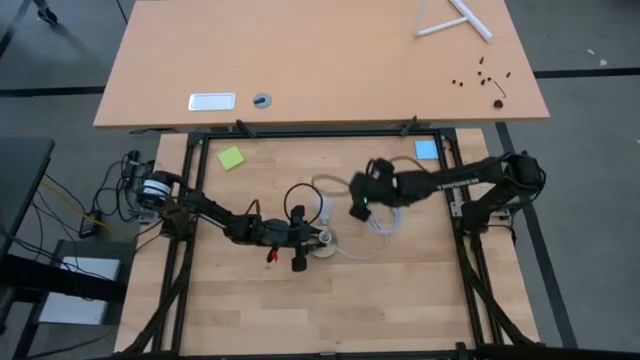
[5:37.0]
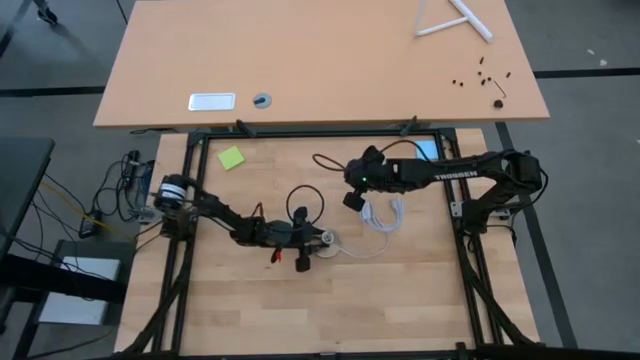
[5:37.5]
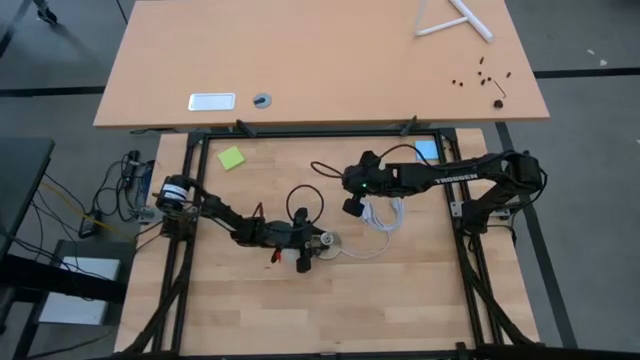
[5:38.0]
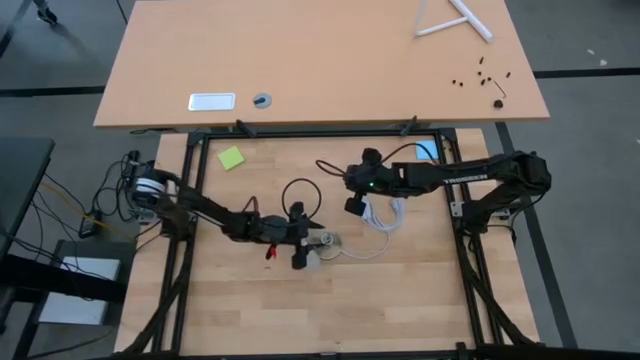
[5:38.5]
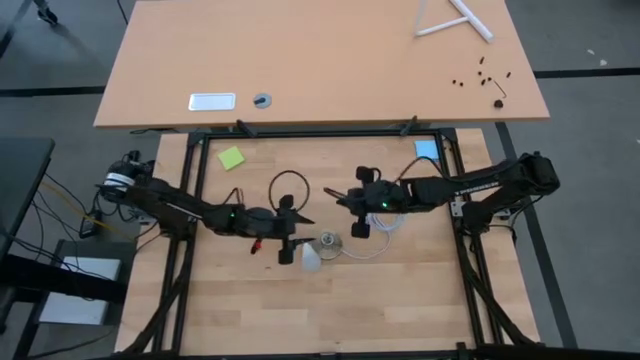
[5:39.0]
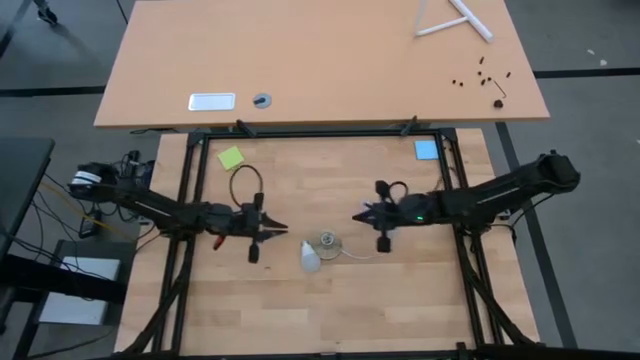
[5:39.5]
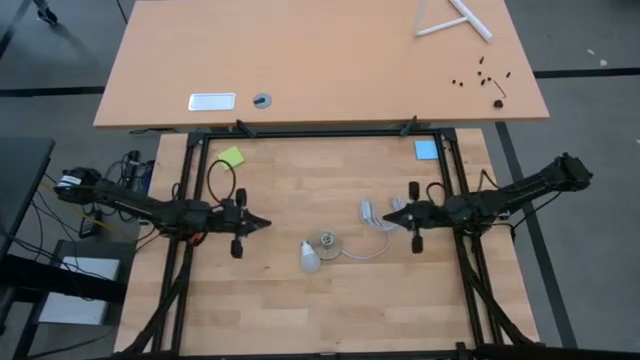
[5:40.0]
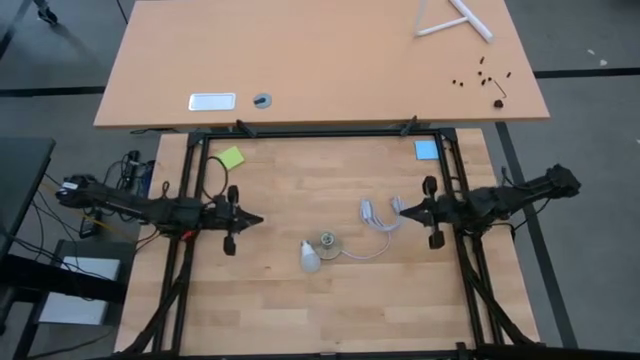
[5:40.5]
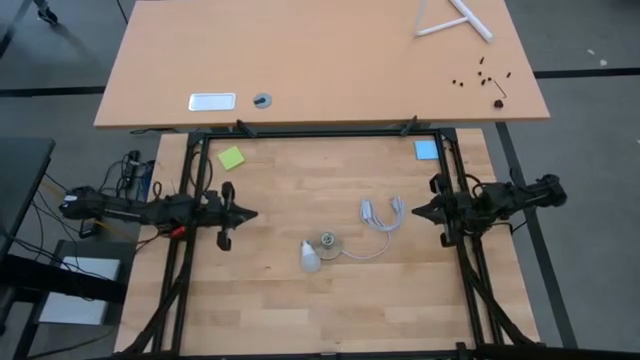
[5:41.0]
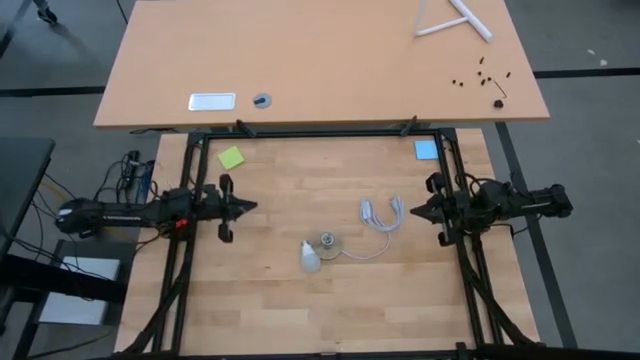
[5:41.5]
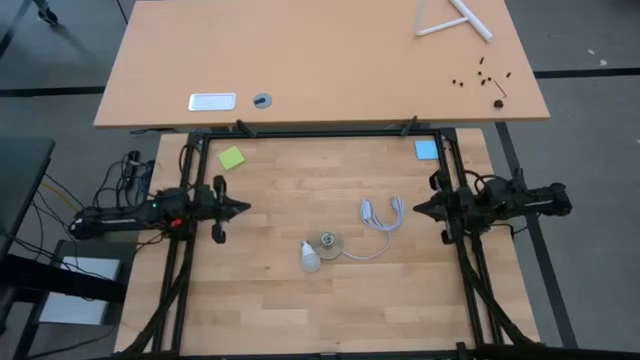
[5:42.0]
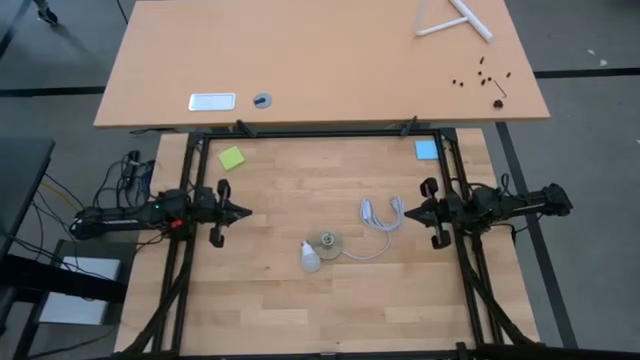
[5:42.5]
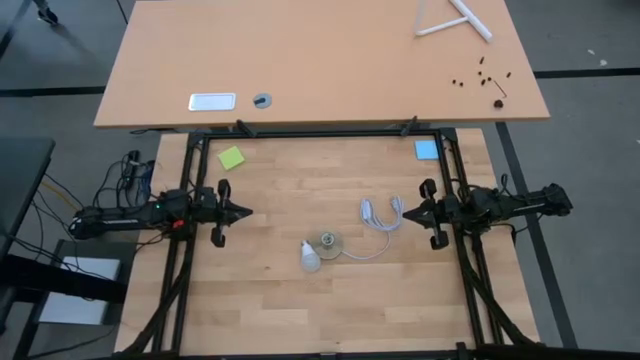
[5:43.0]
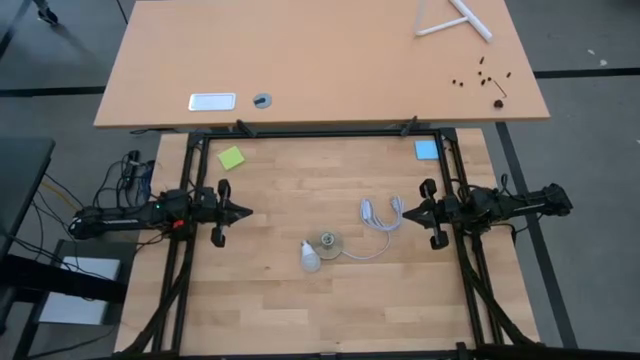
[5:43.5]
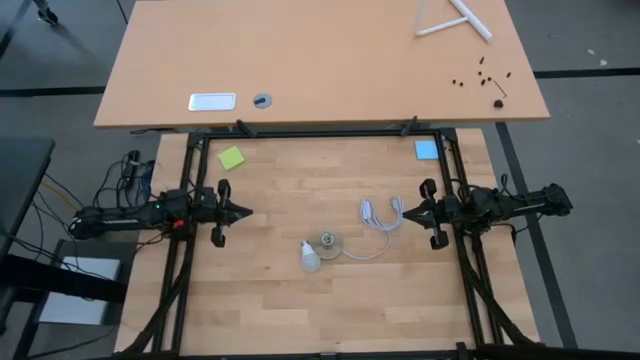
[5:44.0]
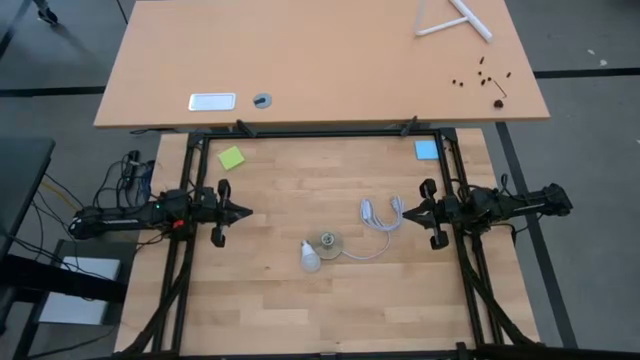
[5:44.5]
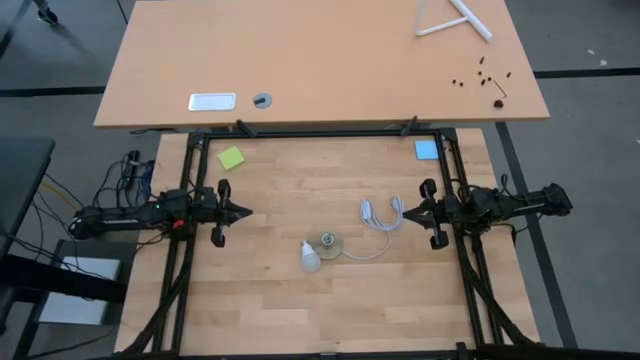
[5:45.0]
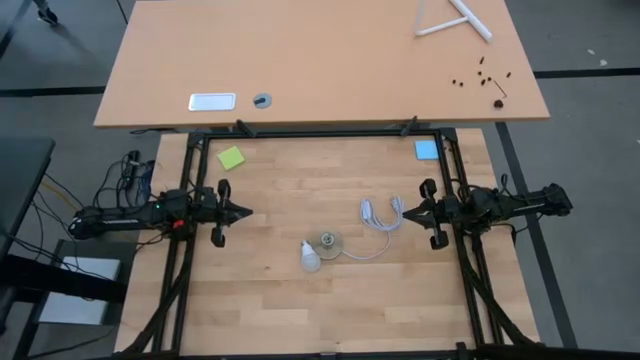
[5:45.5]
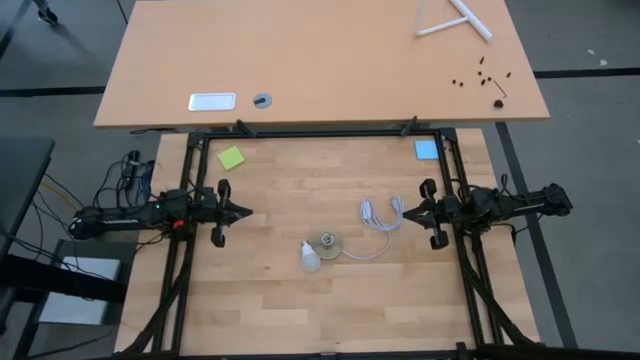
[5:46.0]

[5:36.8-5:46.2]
Task: Screw lightbulb
Return to Home Position

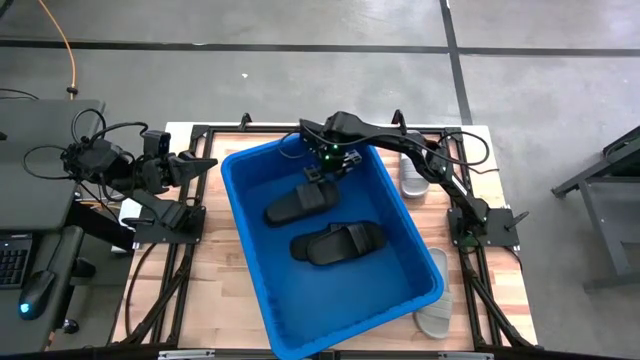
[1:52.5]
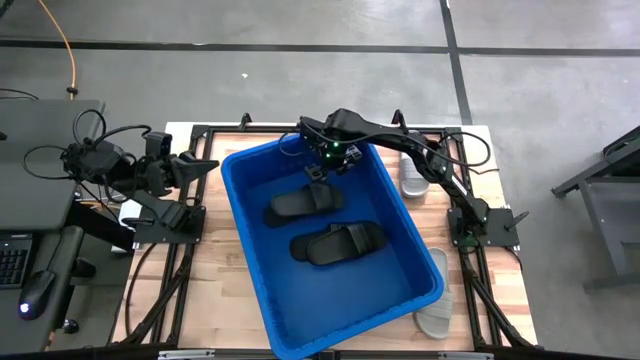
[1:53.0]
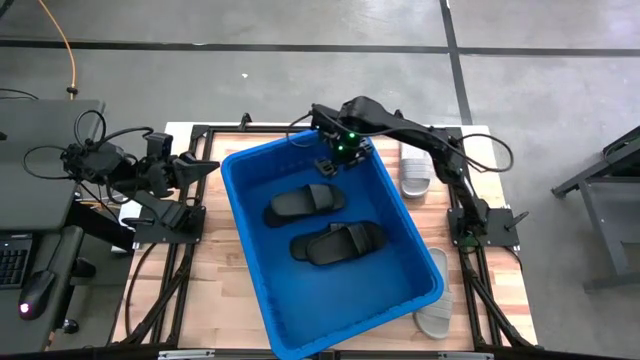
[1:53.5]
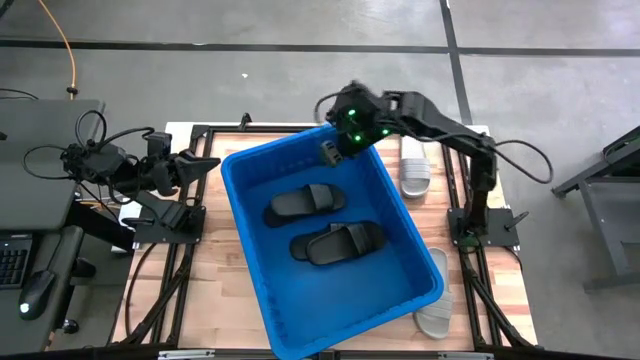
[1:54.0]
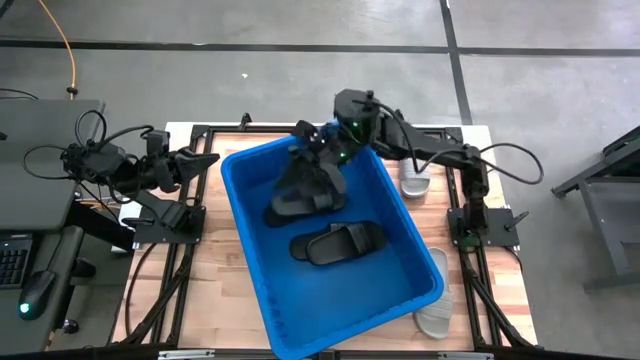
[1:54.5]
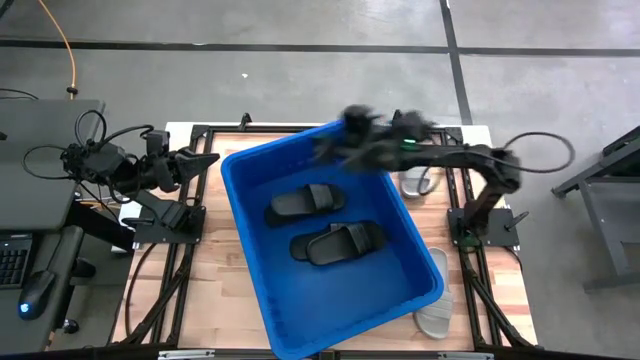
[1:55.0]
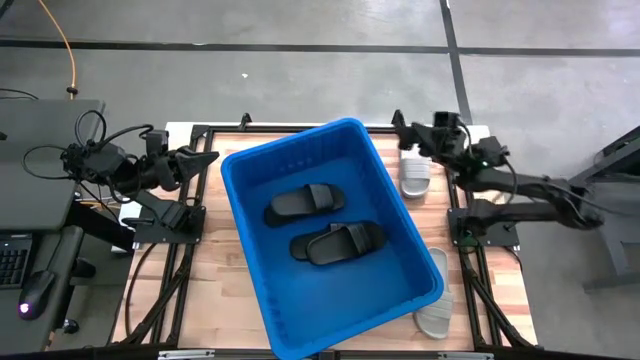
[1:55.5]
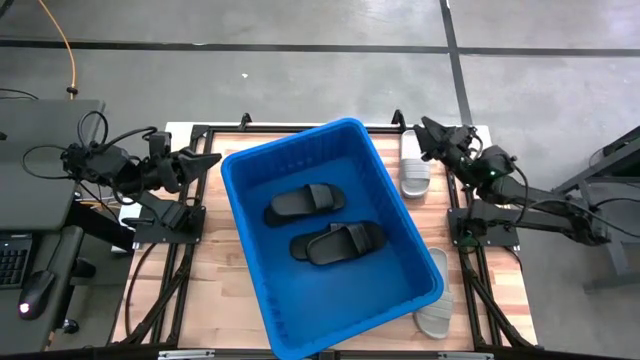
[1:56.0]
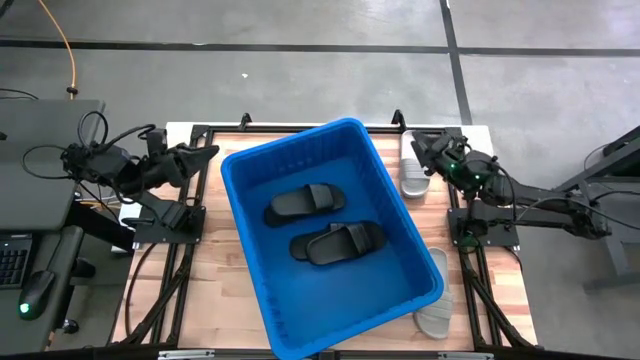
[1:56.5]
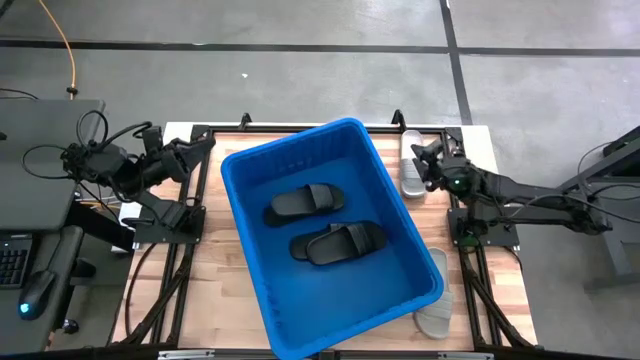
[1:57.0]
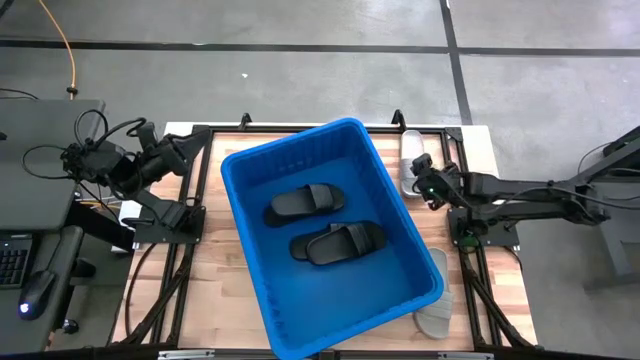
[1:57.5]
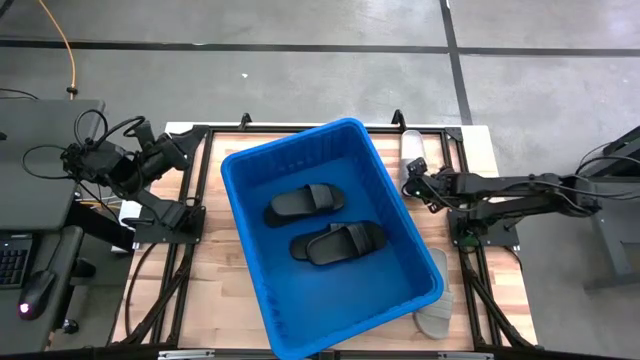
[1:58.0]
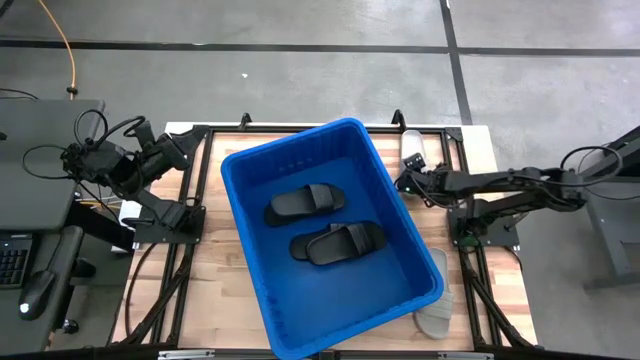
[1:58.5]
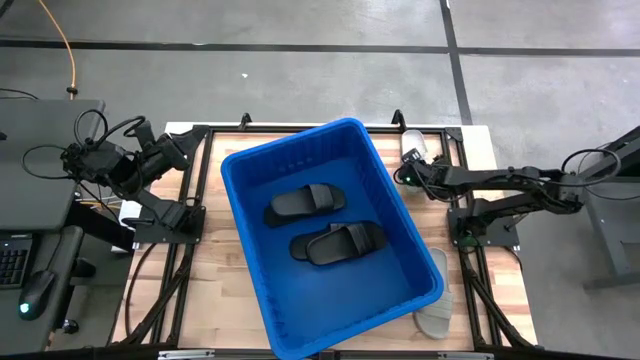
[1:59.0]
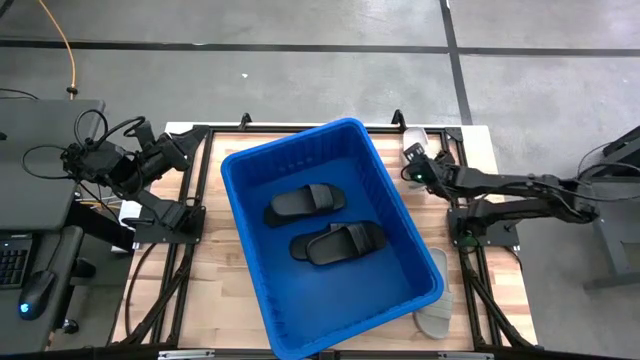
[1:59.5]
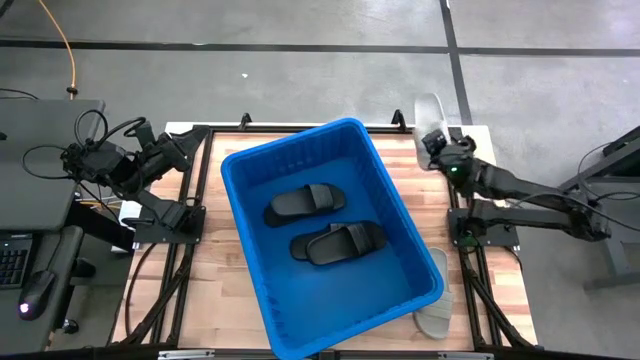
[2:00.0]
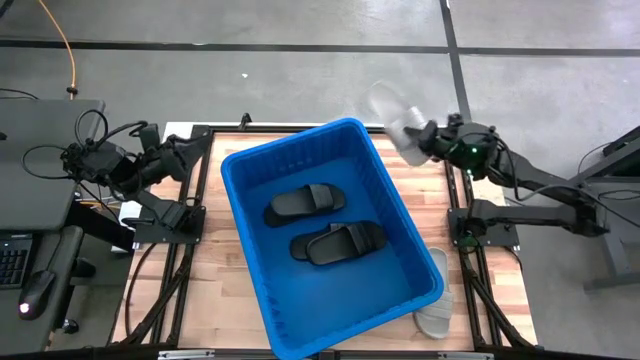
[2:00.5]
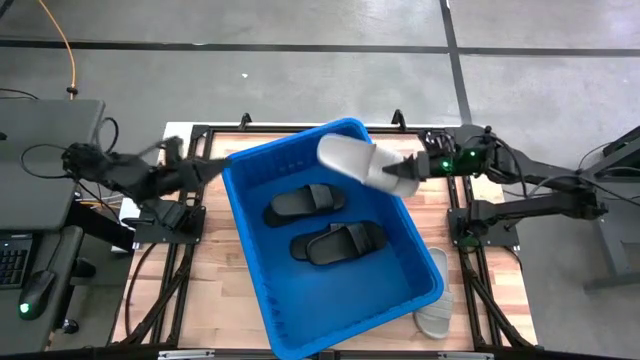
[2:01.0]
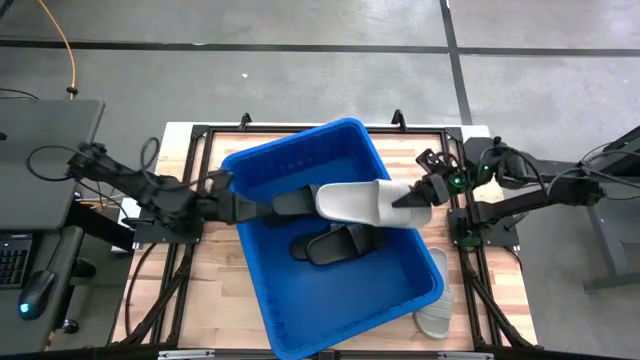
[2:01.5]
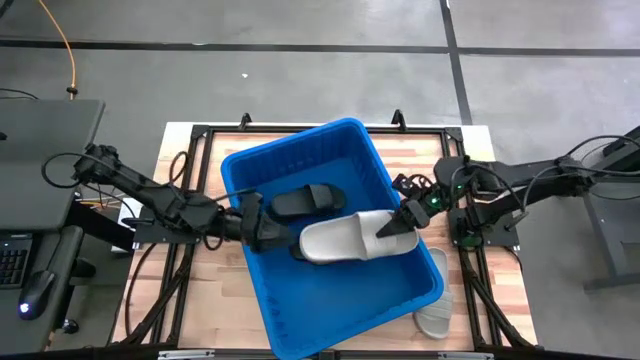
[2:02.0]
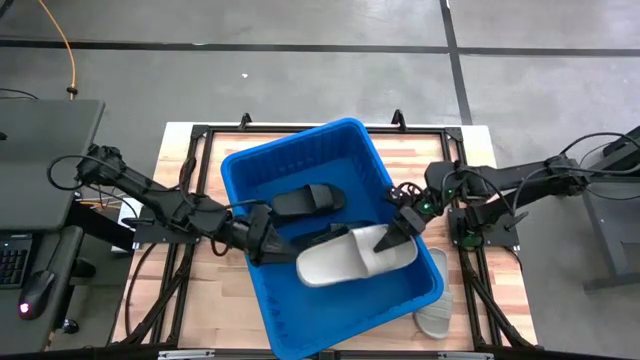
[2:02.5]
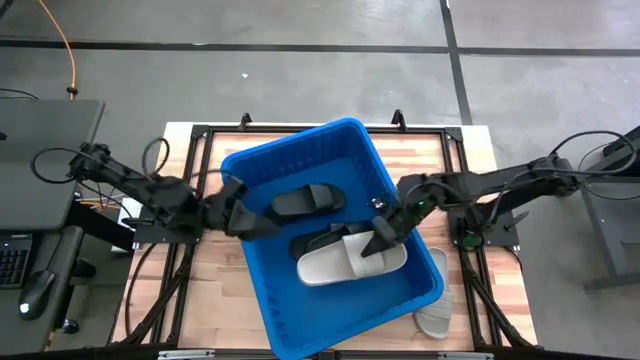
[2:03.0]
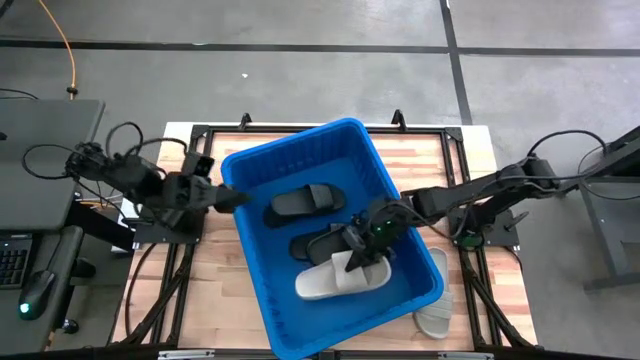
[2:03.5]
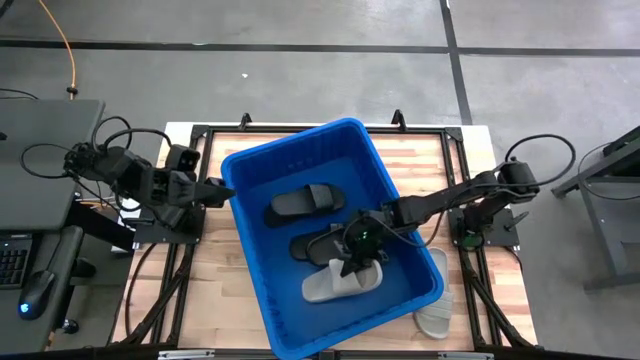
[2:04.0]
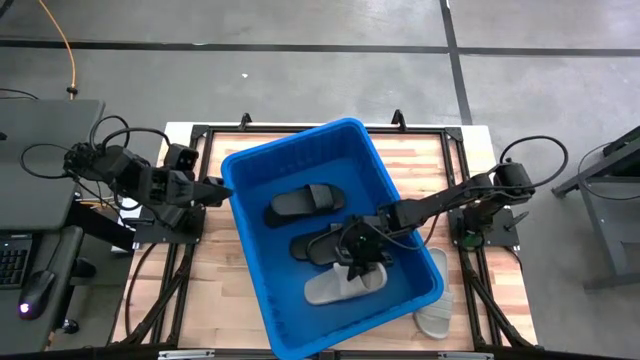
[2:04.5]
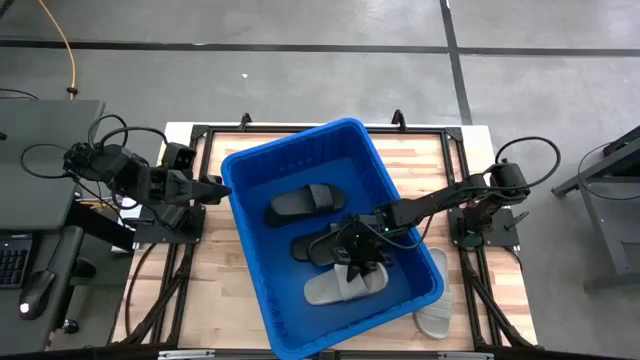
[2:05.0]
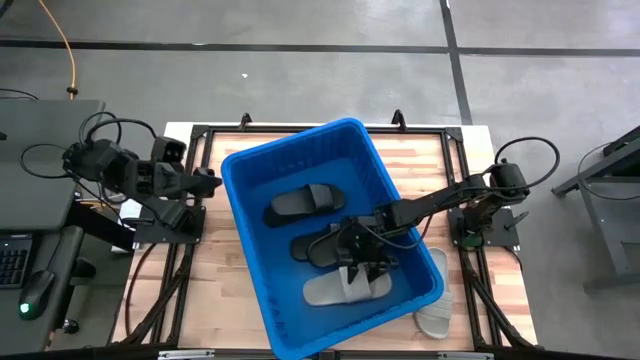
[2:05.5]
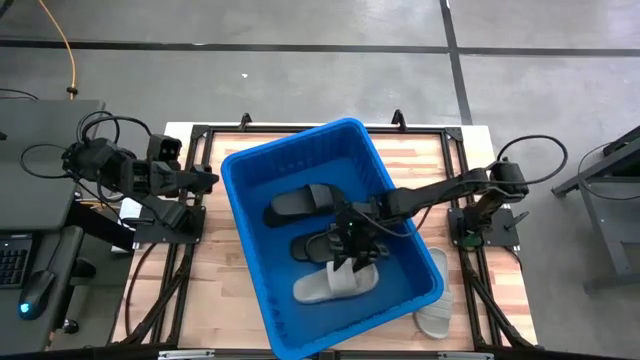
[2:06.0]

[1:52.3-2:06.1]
Task: Pick and place slides into bin
Put the top white slide in the bin
